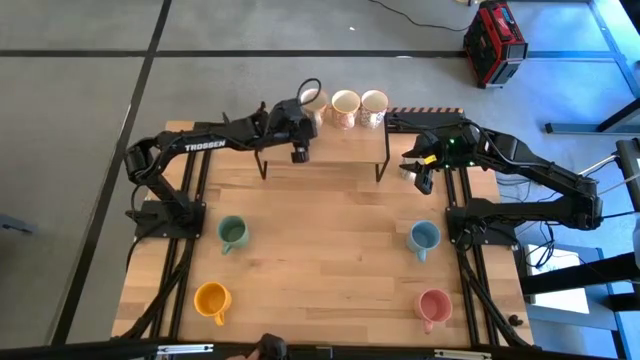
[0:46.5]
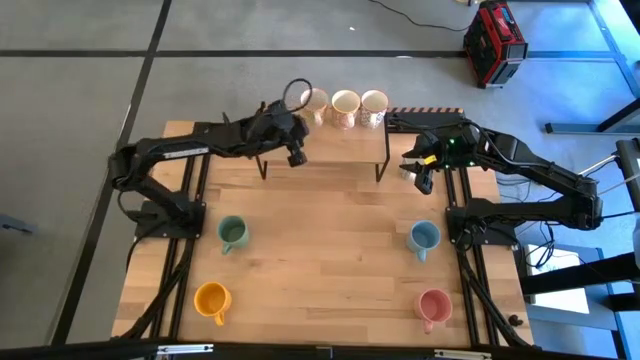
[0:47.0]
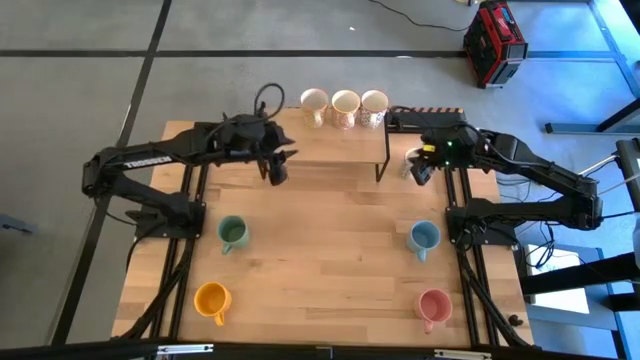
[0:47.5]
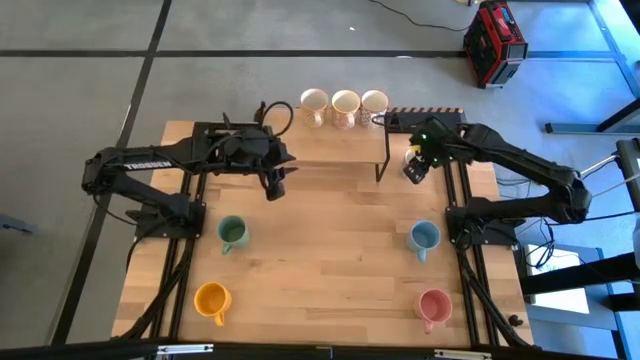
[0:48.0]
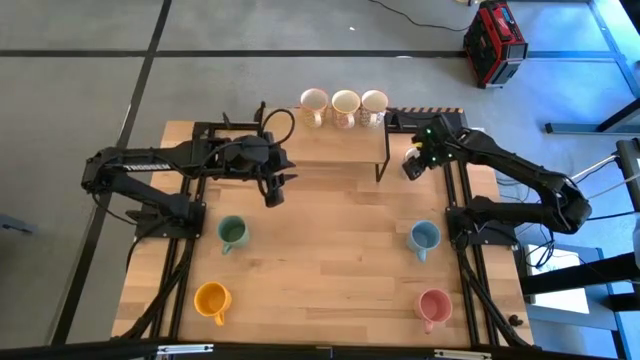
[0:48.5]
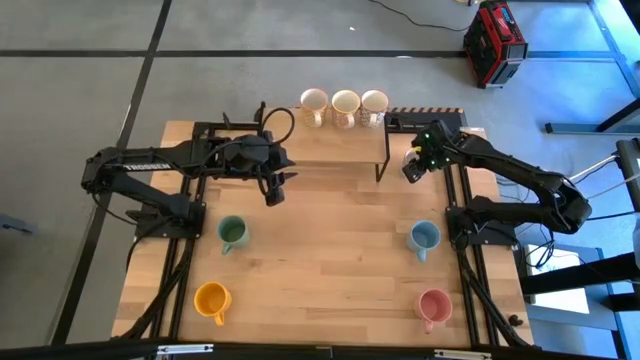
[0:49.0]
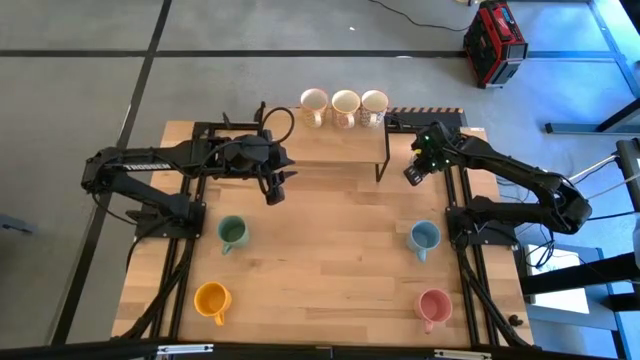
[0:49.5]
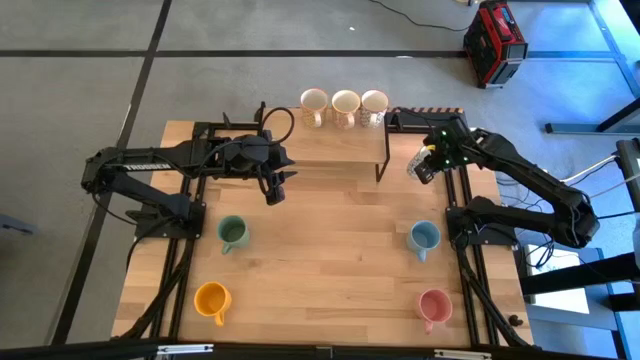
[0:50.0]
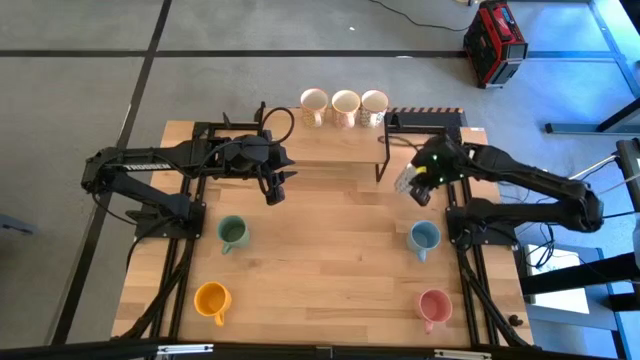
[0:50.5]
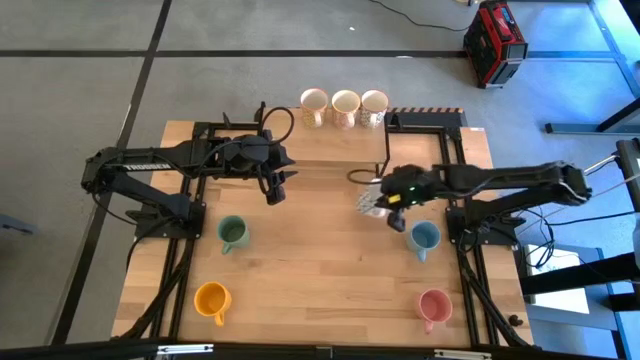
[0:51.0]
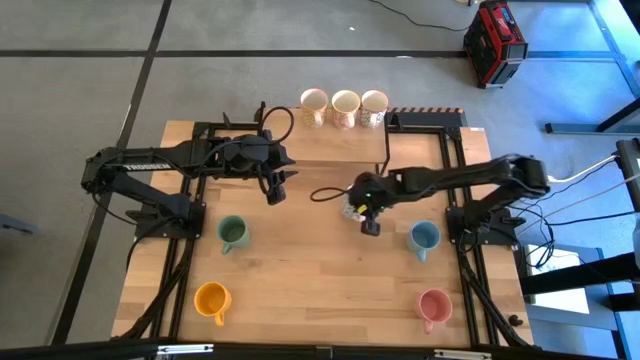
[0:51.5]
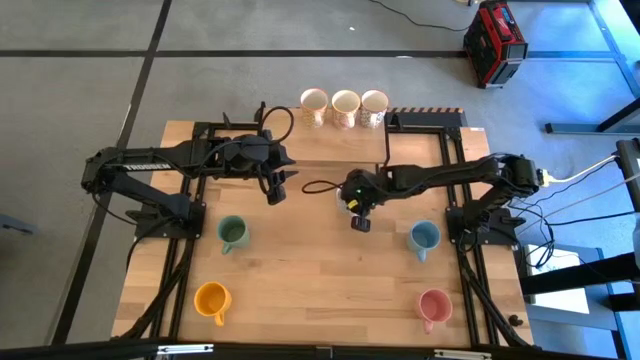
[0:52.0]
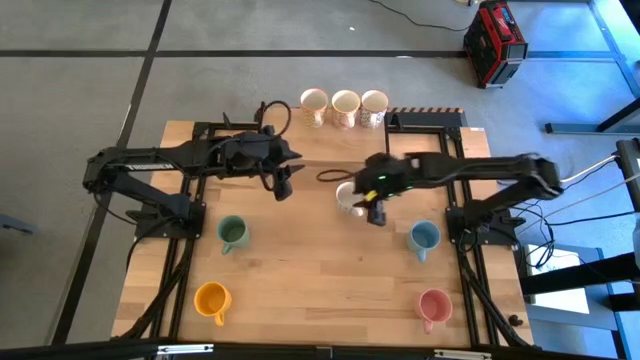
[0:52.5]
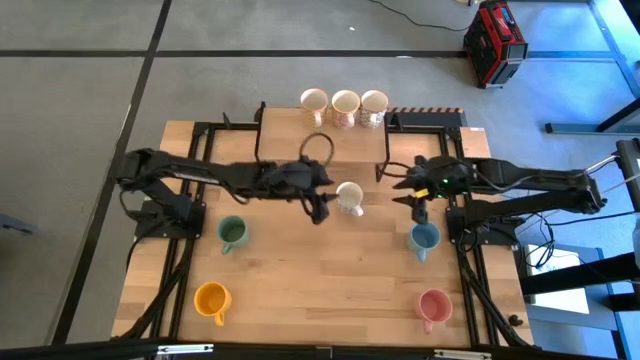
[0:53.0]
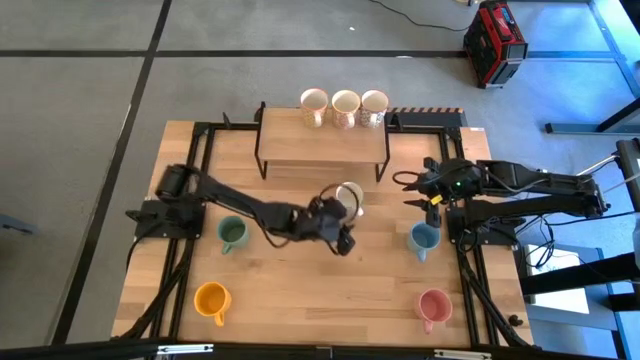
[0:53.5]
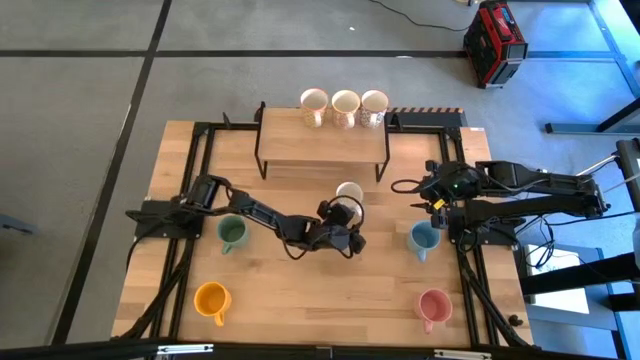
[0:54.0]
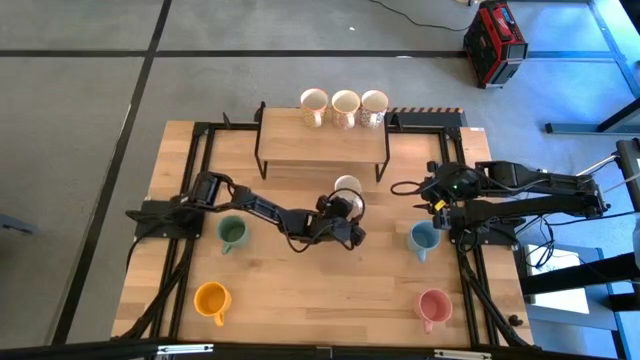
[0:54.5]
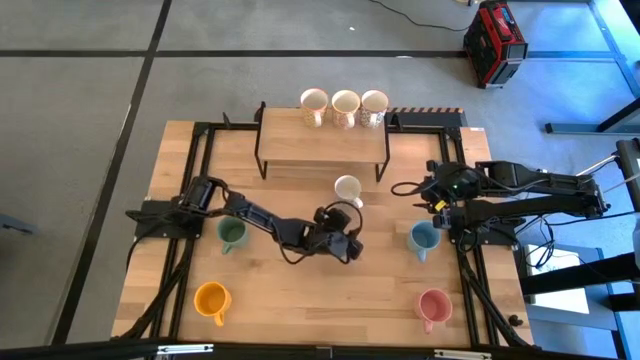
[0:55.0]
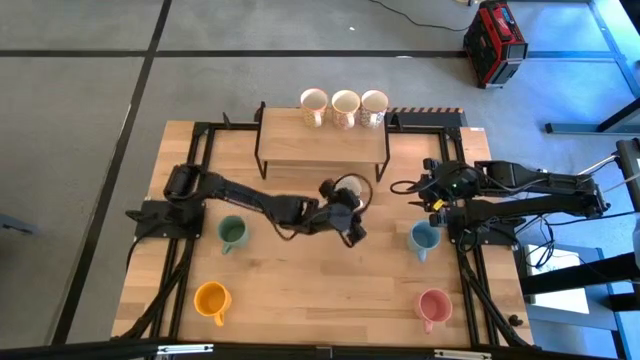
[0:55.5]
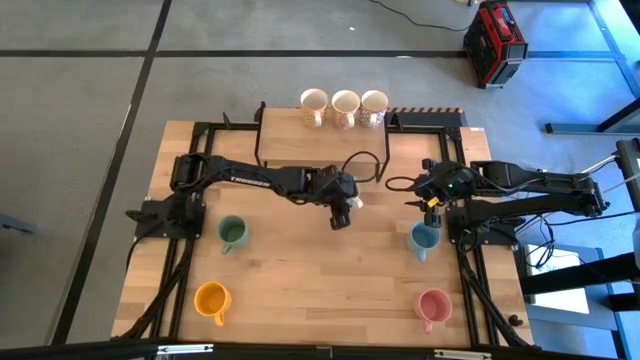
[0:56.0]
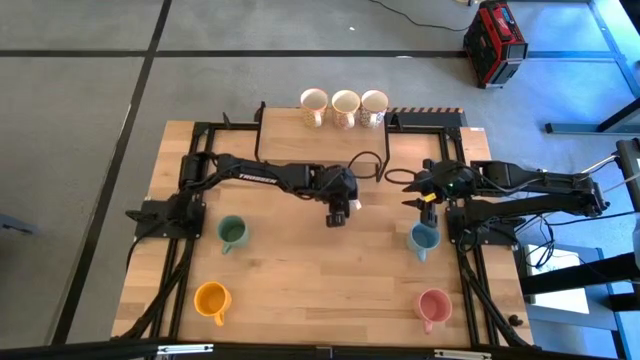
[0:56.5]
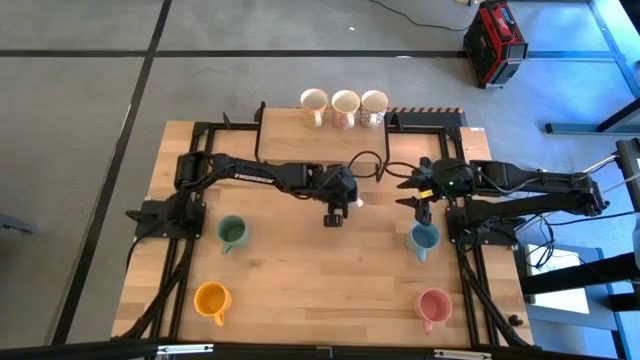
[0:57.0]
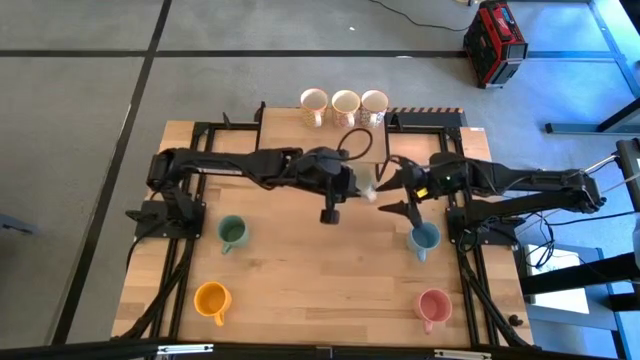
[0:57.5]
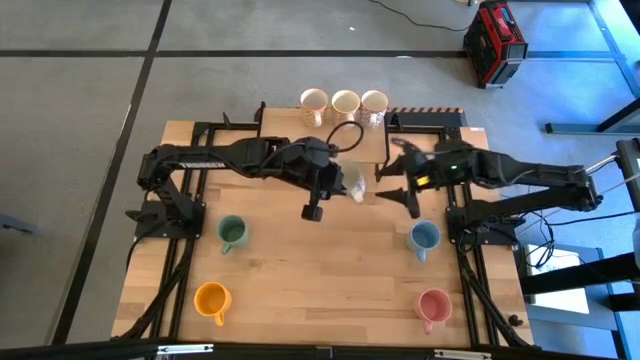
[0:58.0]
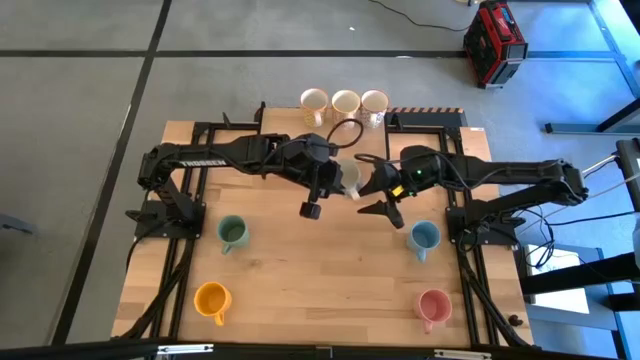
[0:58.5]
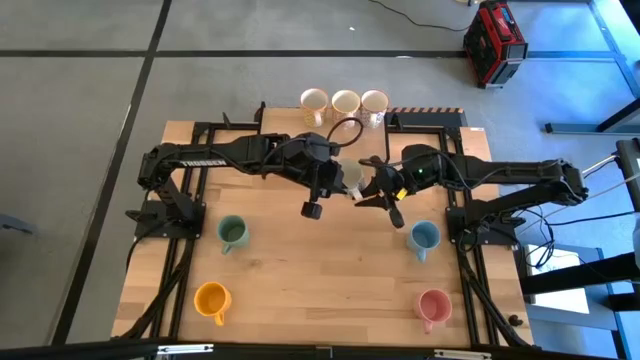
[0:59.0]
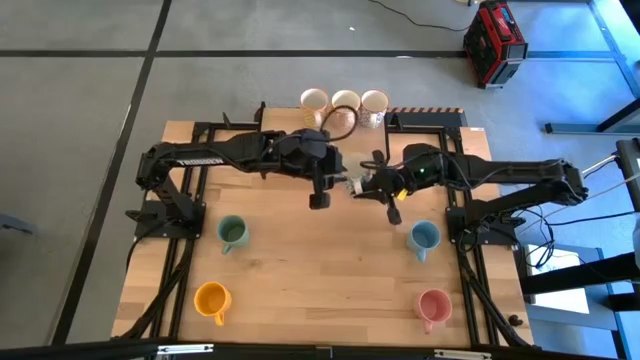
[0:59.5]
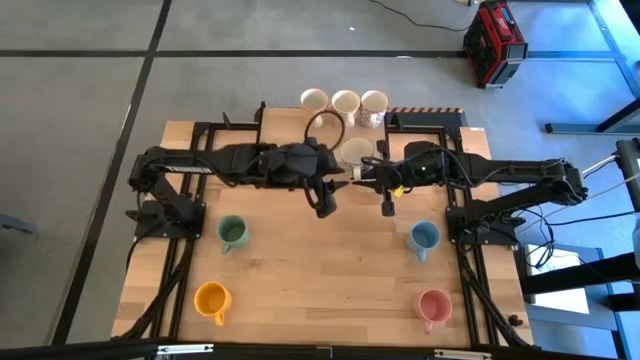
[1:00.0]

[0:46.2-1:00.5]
Task: Place coffee mugs
Put the blue patterned mug on the shelf

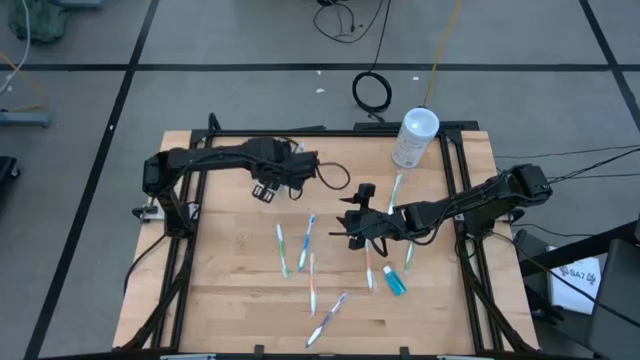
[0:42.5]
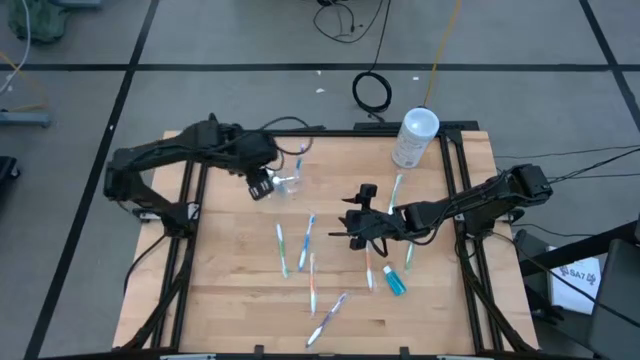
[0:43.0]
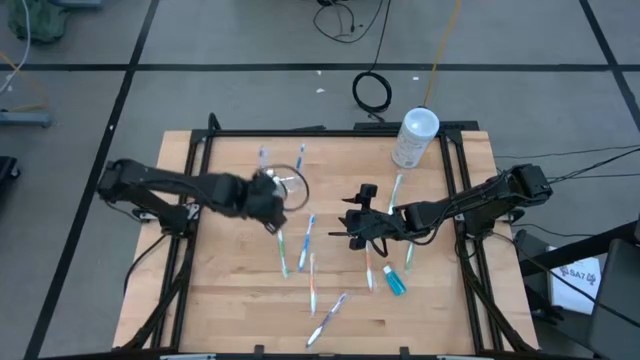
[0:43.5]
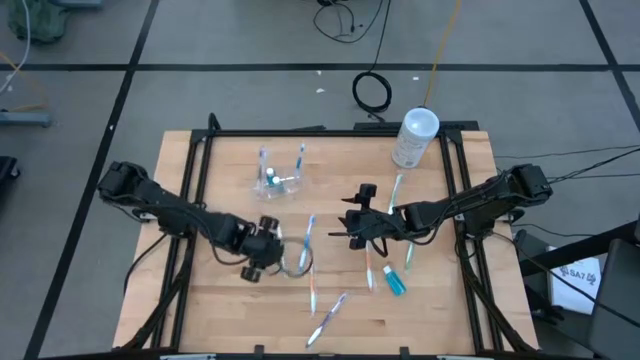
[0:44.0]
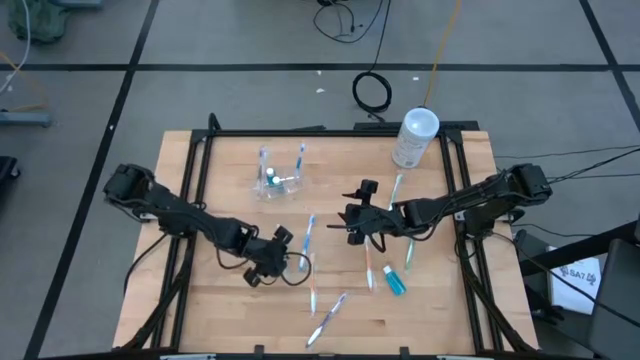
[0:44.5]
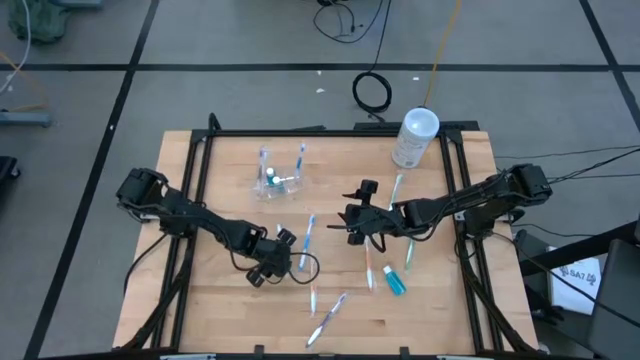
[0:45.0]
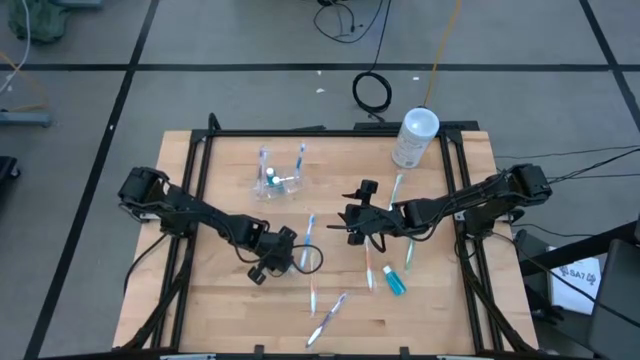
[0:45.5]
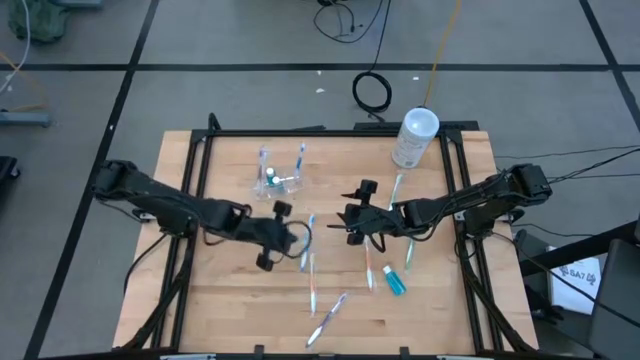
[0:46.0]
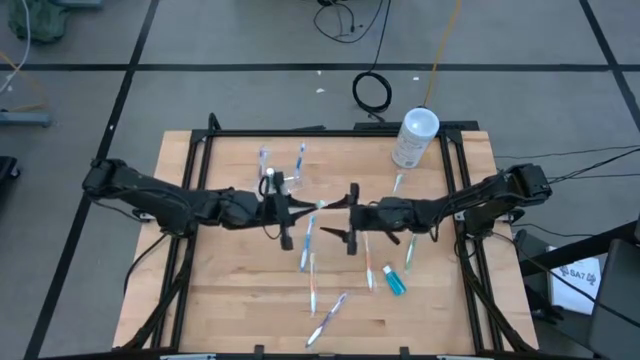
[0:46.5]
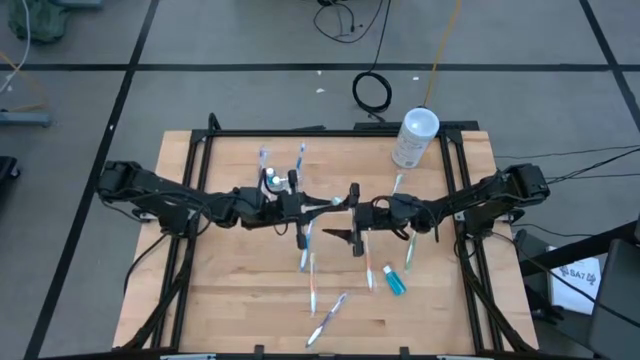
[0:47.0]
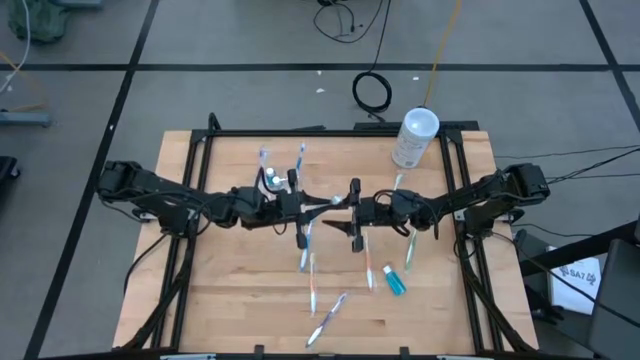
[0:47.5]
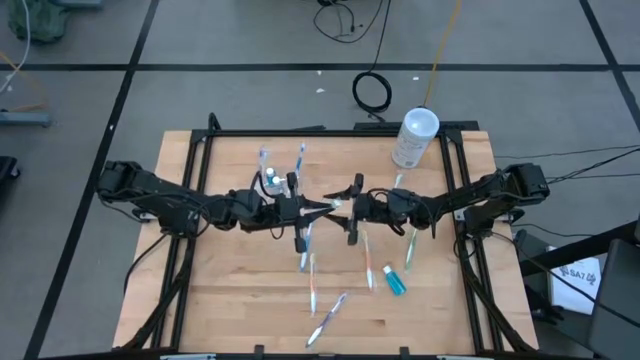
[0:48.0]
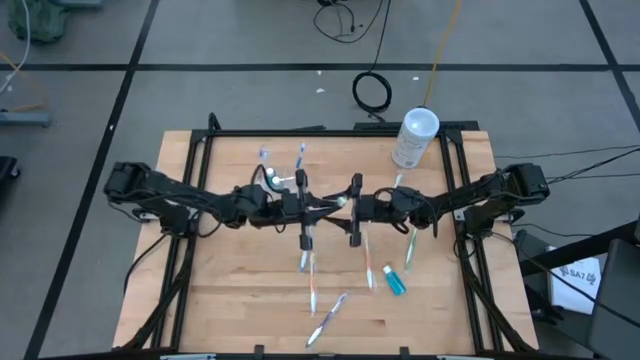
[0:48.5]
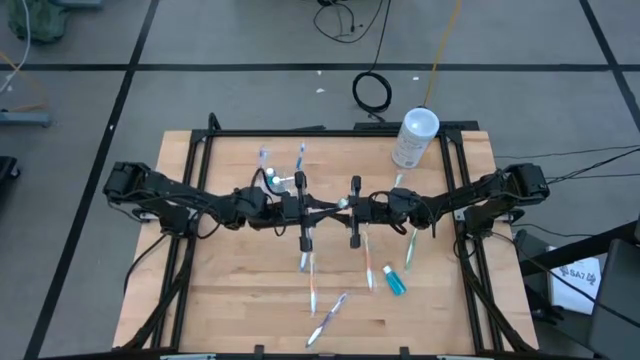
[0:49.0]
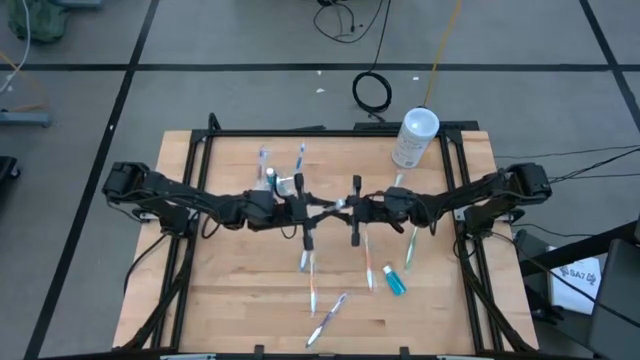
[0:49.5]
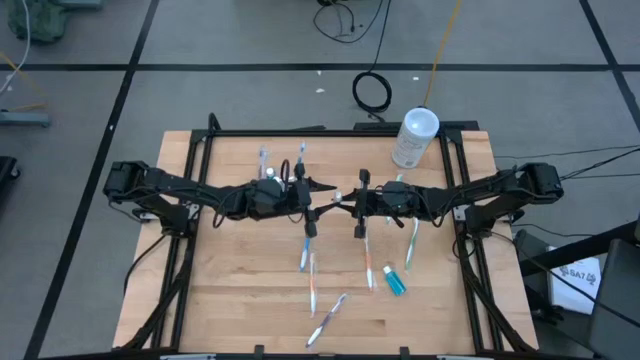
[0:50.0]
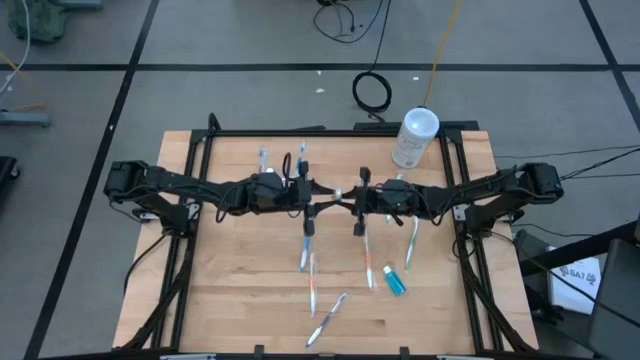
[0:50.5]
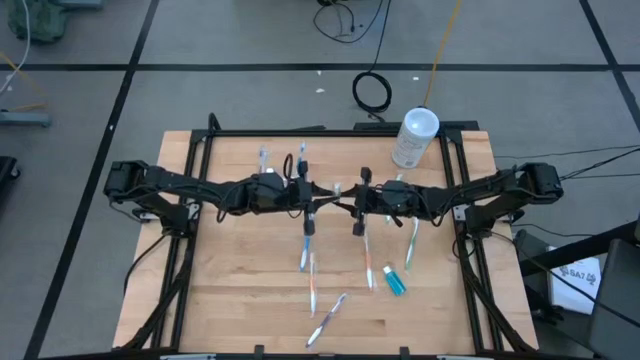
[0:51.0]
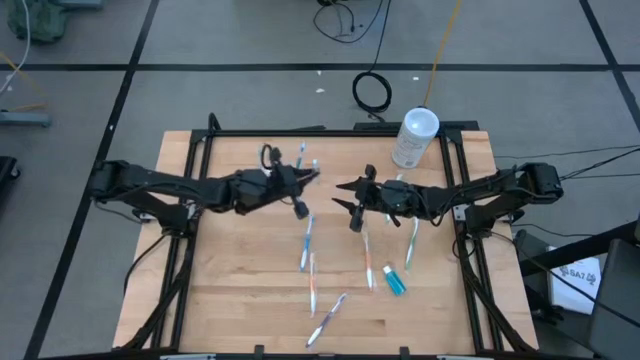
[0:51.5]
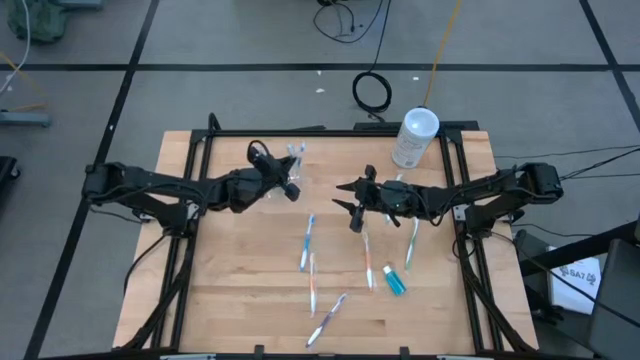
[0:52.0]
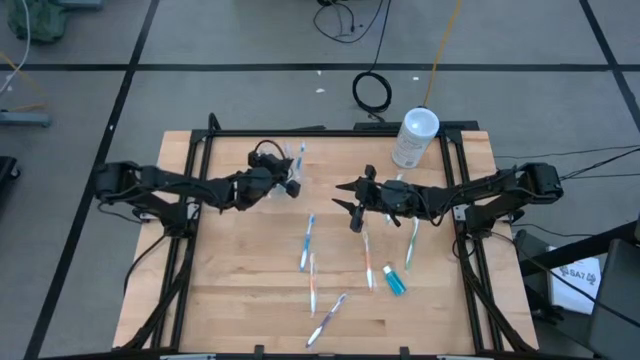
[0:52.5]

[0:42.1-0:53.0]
Task: Pick & Place toothbrushing station
Put the bottom left green tooth brush into the right compartment of the transparent organizer
